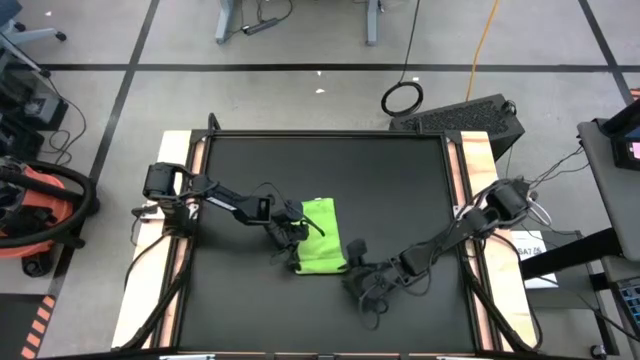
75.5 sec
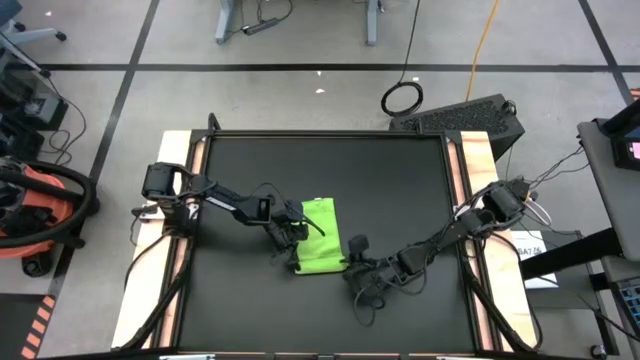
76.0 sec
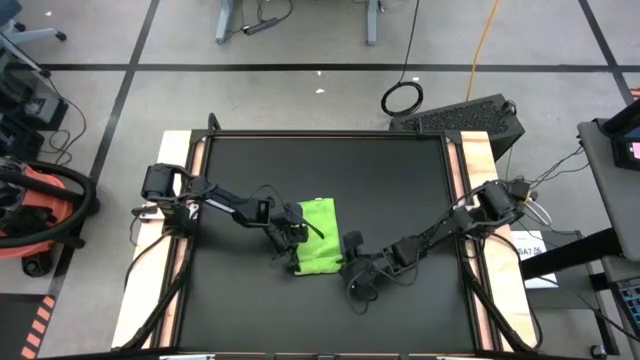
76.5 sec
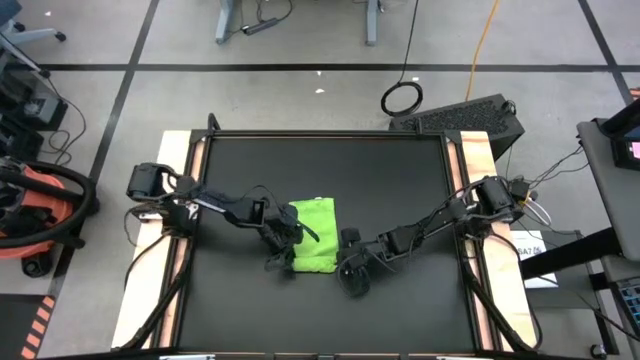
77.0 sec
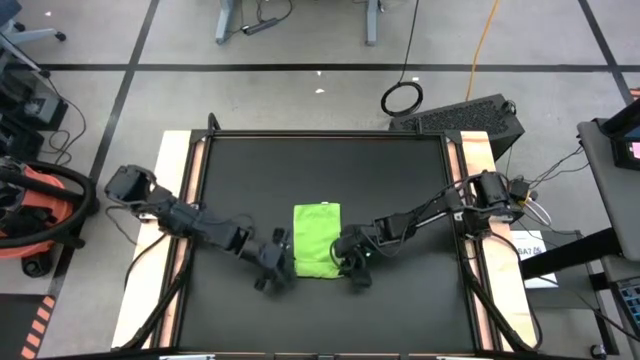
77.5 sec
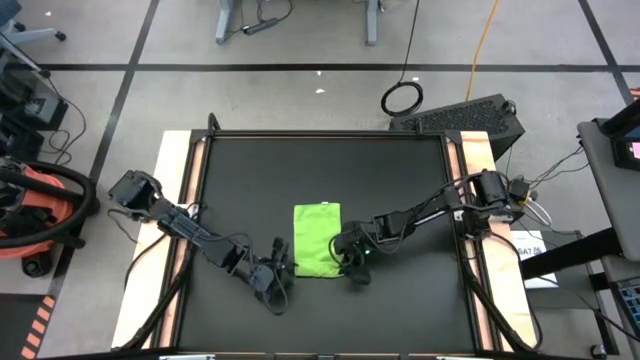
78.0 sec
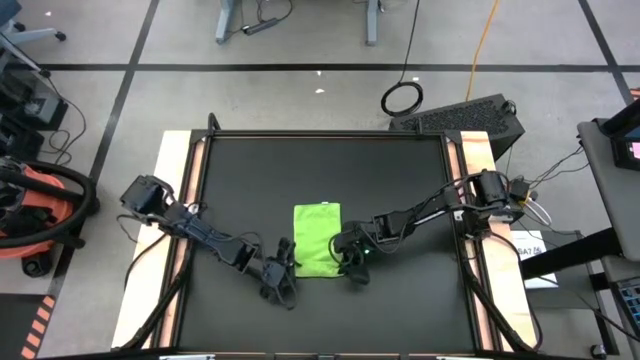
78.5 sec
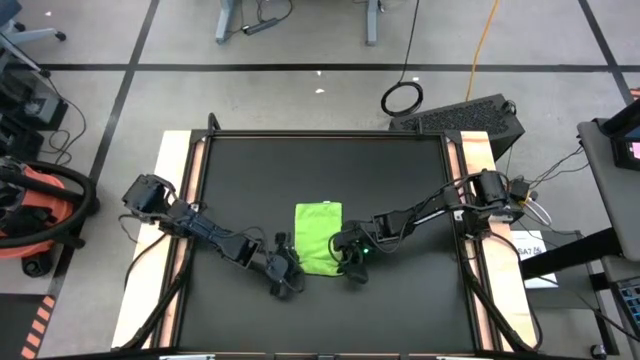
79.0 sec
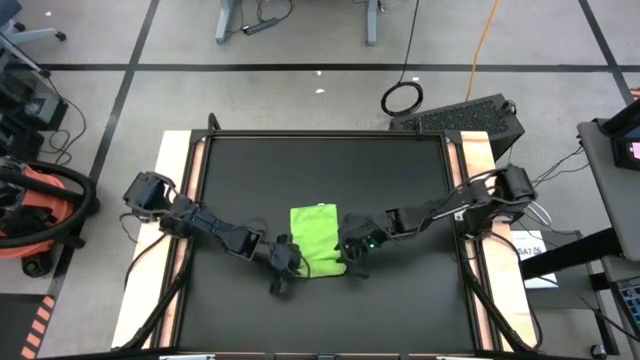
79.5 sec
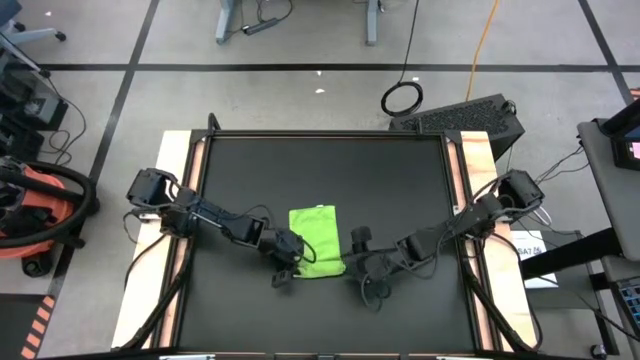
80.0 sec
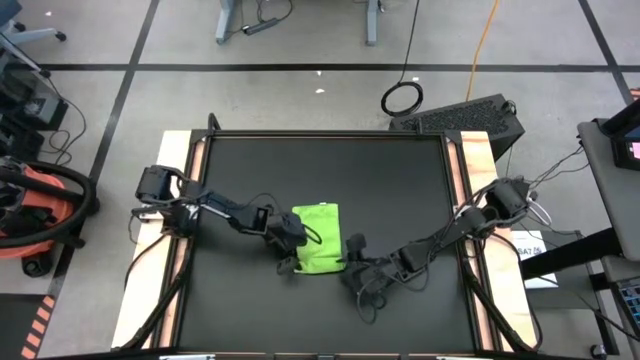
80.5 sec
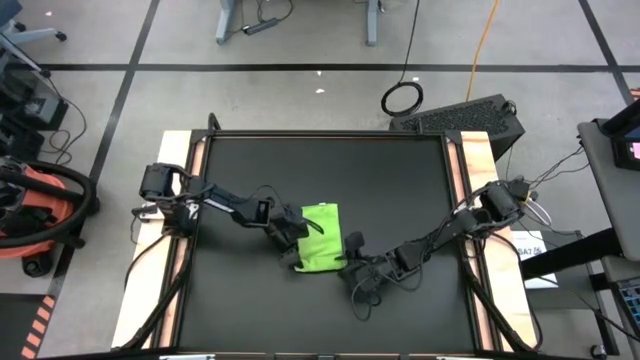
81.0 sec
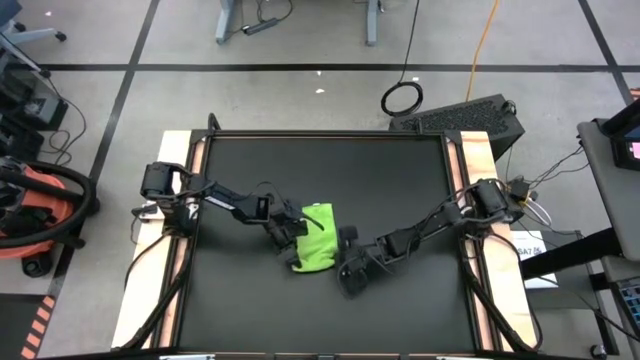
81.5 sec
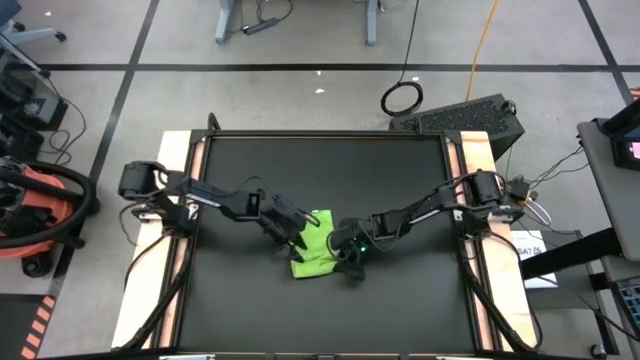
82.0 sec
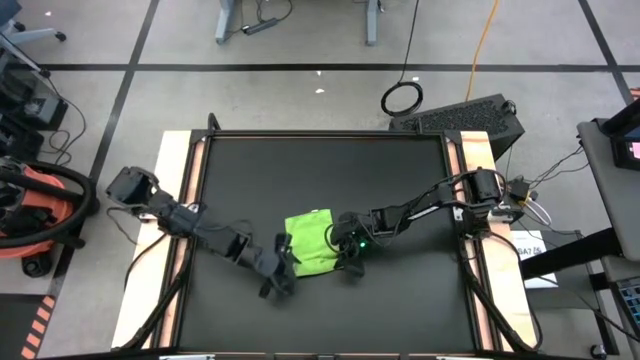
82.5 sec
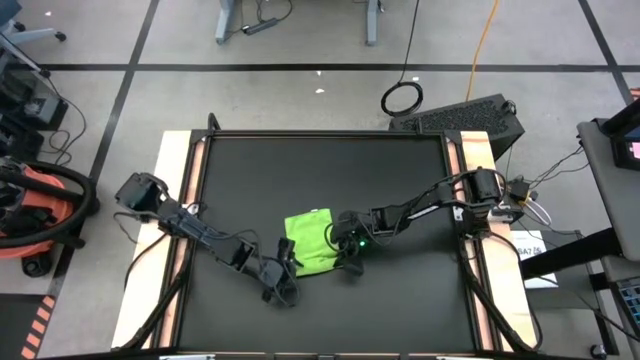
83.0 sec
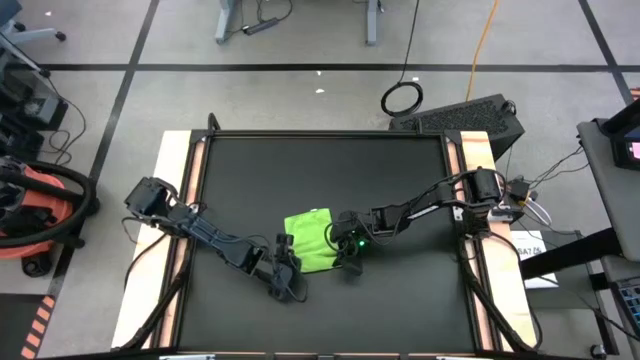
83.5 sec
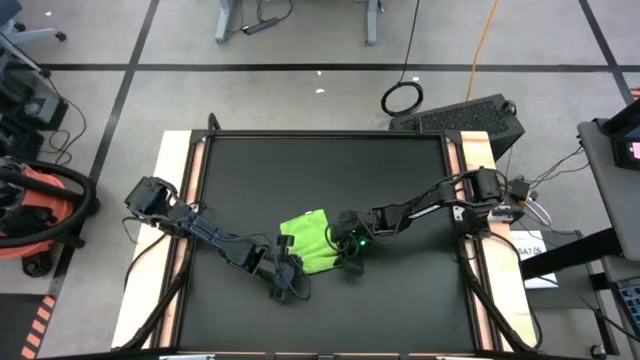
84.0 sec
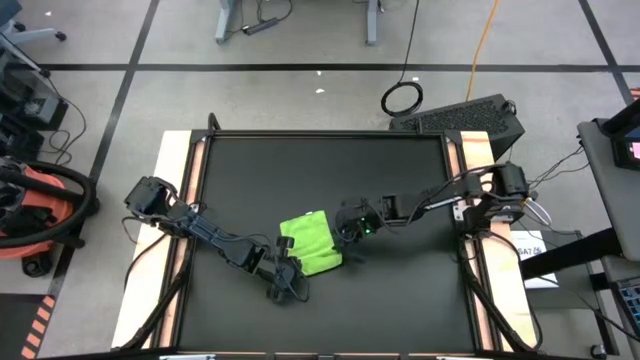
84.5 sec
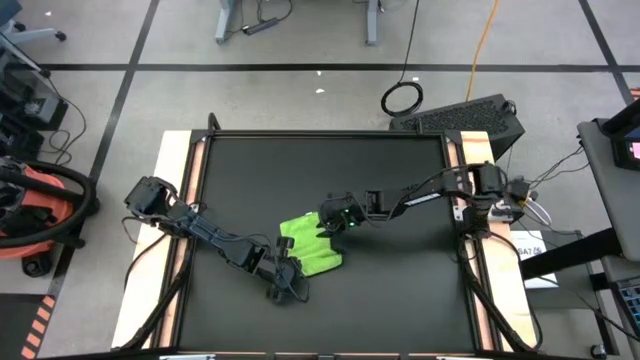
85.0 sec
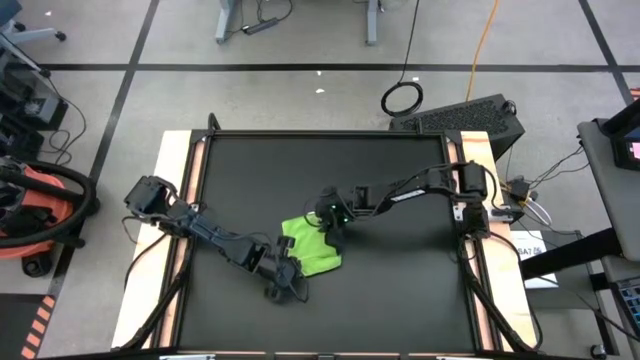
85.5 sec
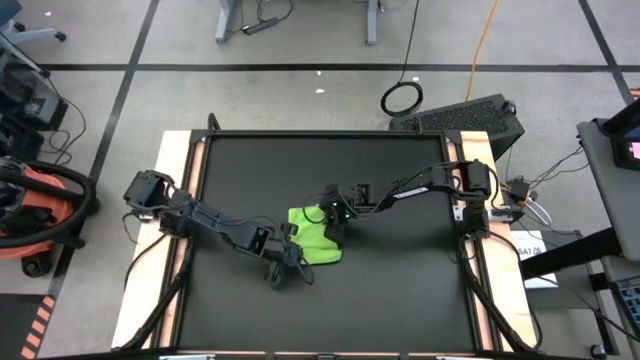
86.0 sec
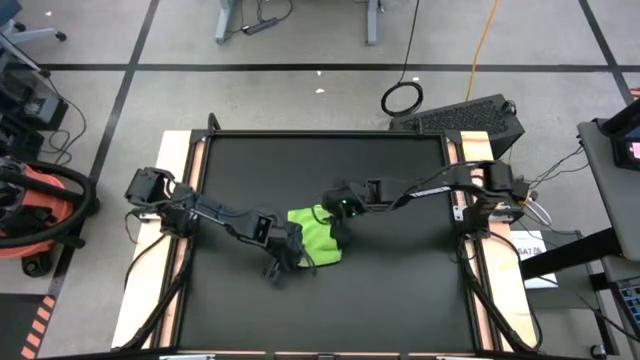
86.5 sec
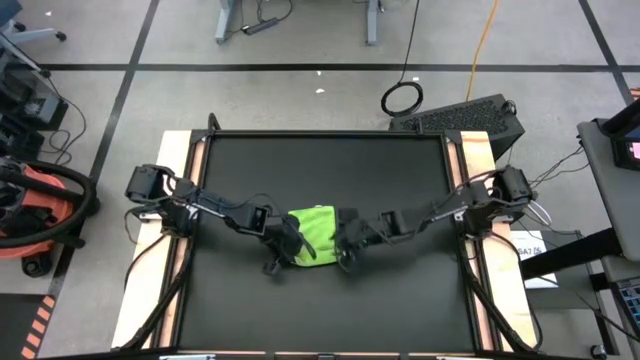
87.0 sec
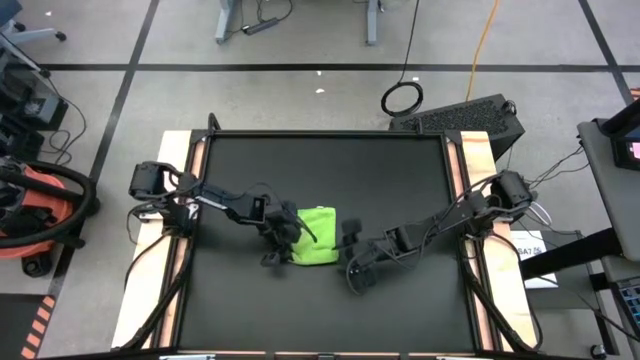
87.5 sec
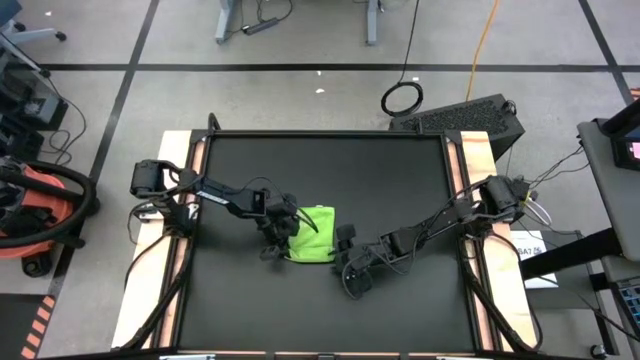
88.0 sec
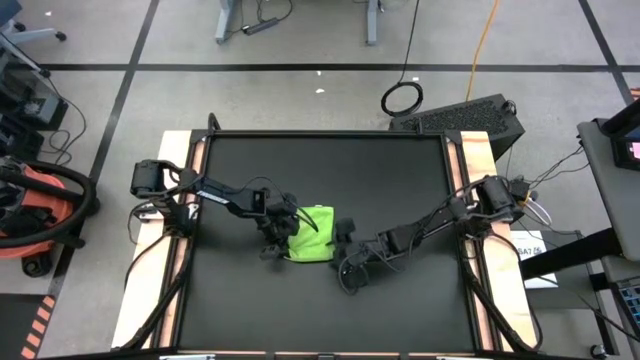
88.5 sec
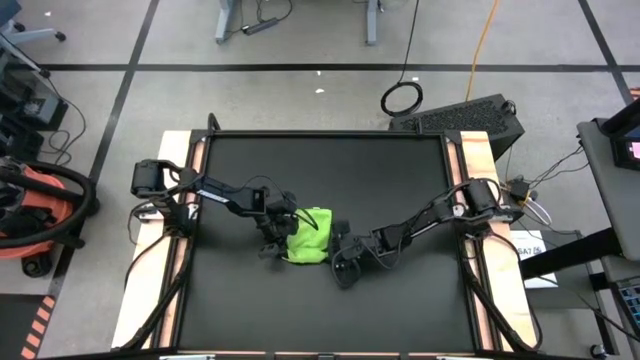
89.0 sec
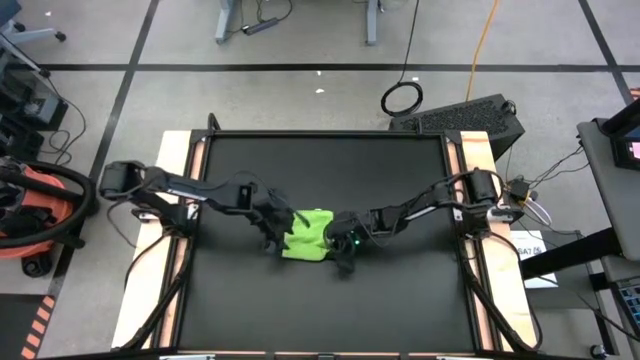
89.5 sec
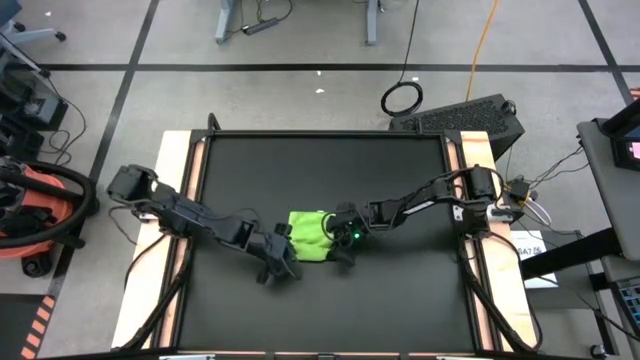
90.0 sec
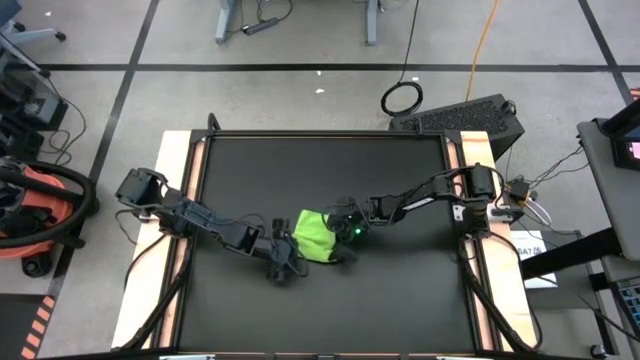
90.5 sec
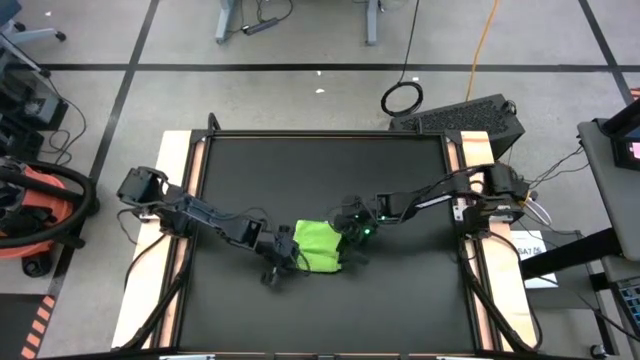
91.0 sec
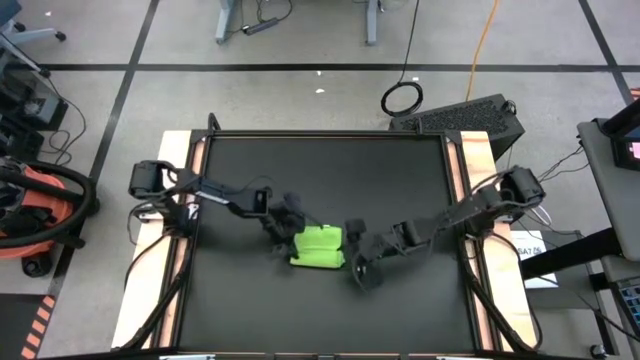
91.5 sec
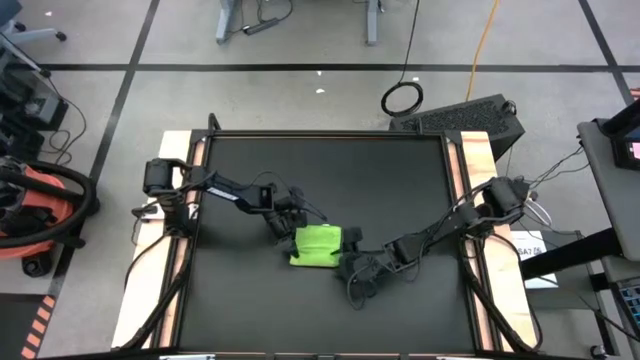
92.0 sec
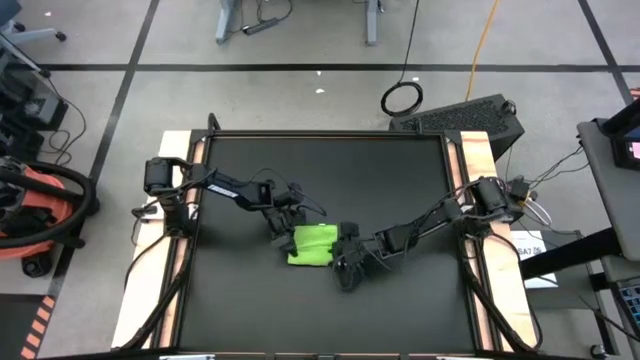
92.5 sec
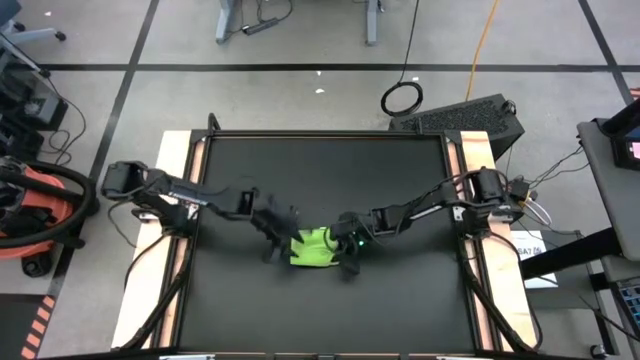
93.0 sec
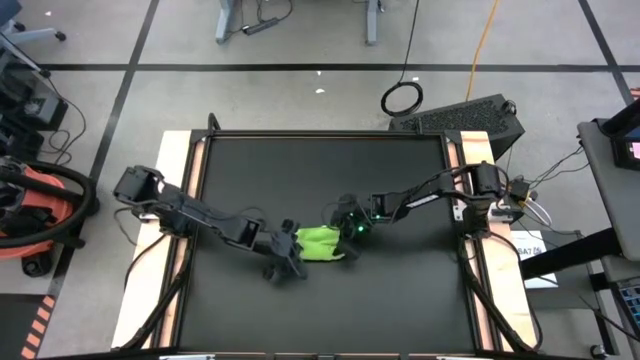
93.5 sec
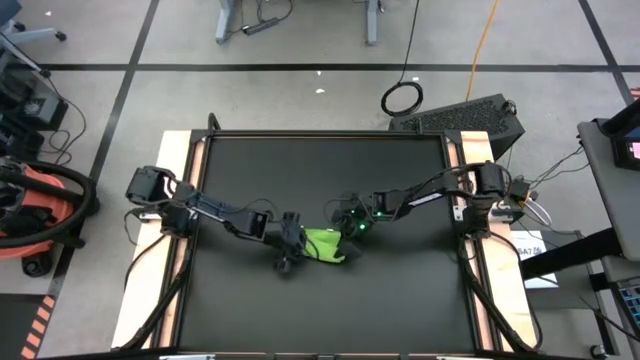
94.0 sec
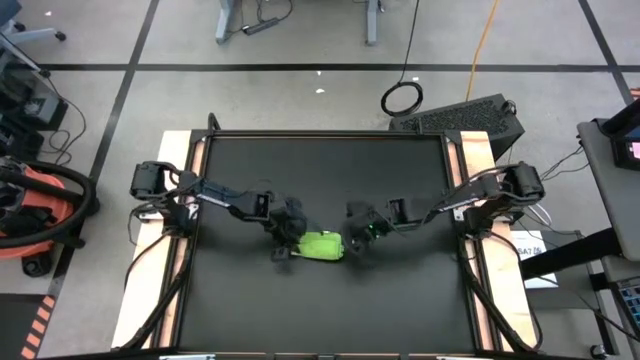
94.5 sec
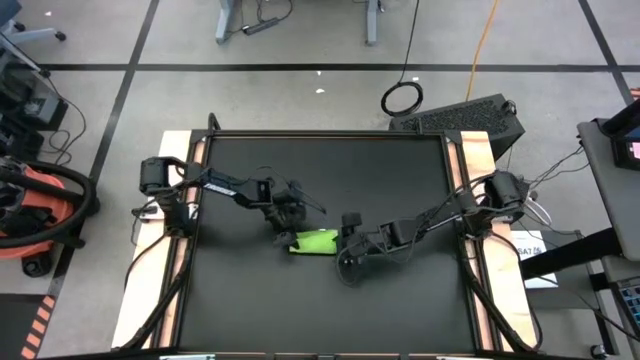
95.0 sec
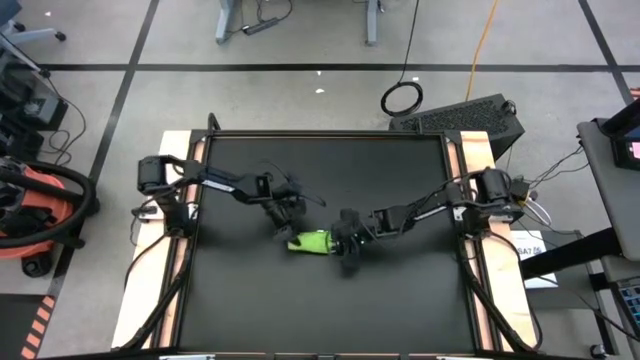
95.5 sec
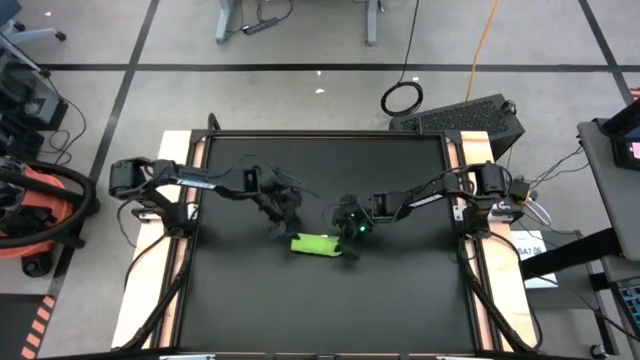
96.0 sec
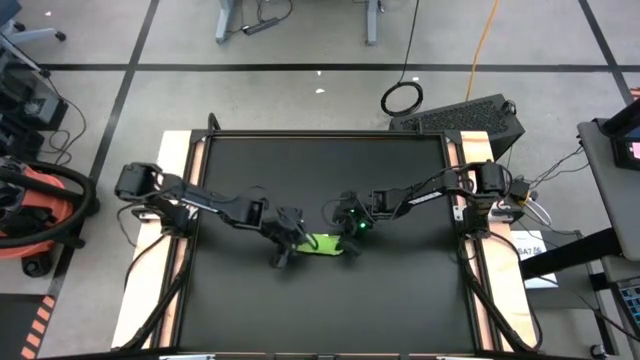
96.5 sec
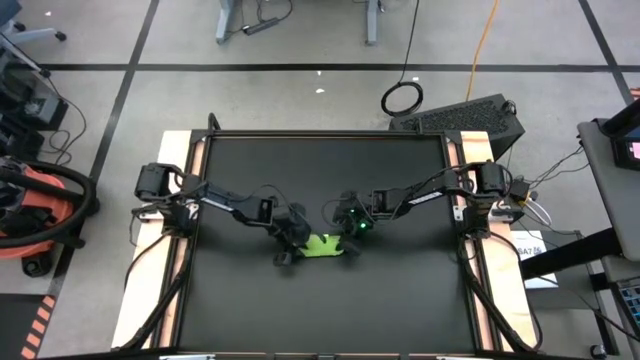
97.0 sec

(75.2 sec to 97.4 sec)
Task: Roll towel
Roll the green microfiber cloth
